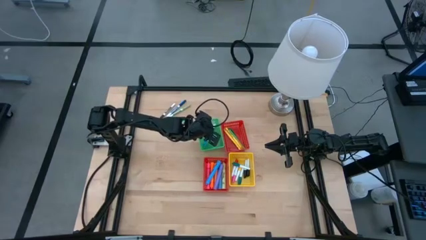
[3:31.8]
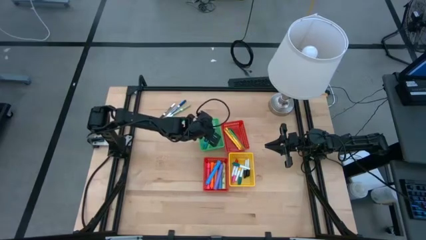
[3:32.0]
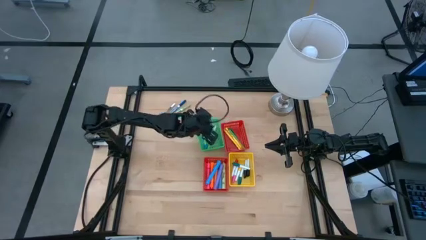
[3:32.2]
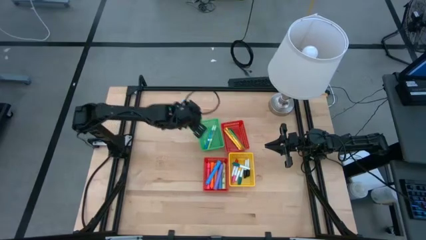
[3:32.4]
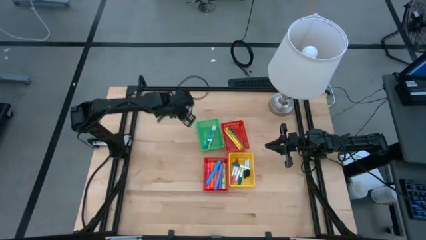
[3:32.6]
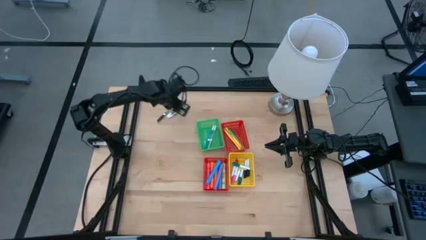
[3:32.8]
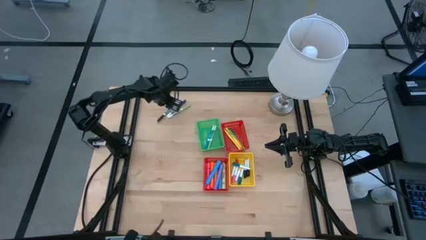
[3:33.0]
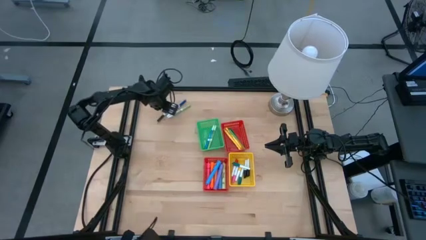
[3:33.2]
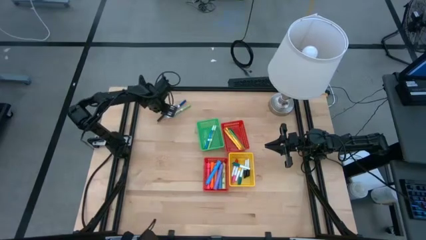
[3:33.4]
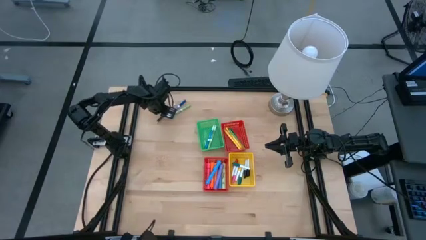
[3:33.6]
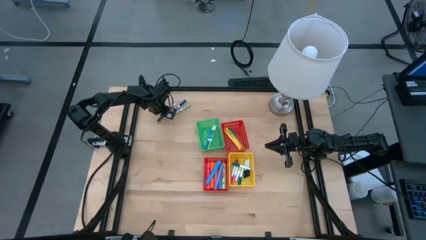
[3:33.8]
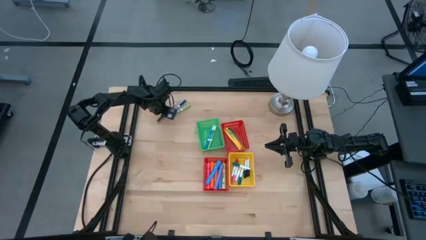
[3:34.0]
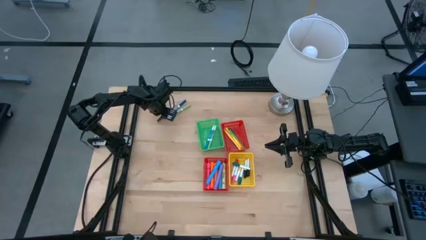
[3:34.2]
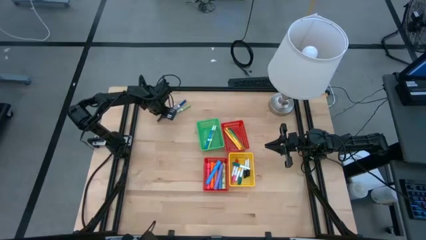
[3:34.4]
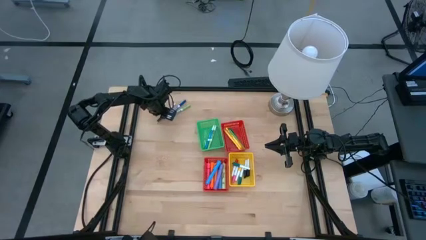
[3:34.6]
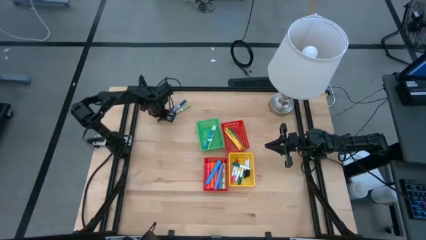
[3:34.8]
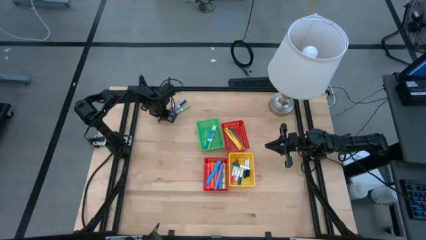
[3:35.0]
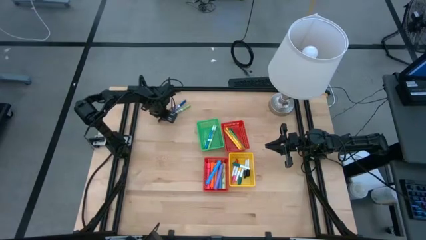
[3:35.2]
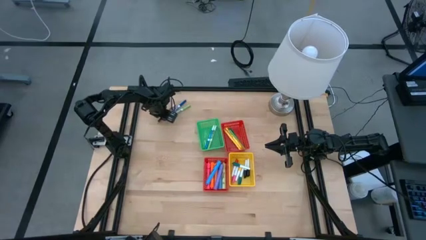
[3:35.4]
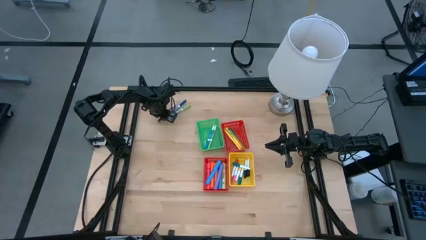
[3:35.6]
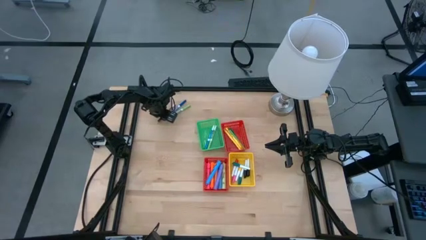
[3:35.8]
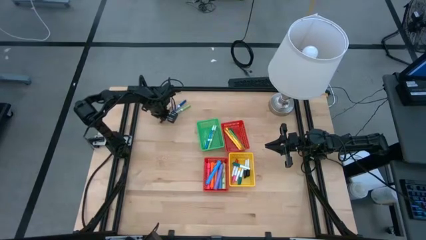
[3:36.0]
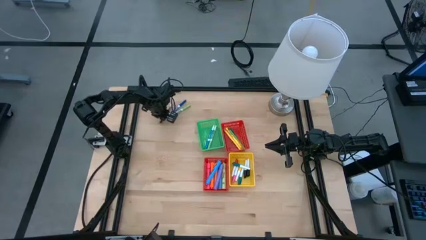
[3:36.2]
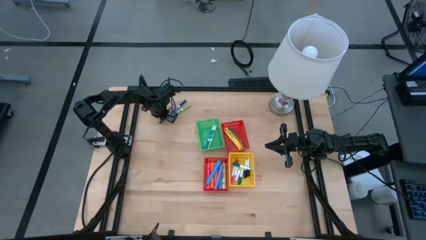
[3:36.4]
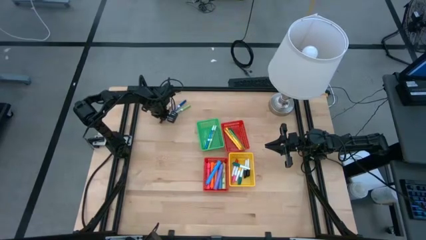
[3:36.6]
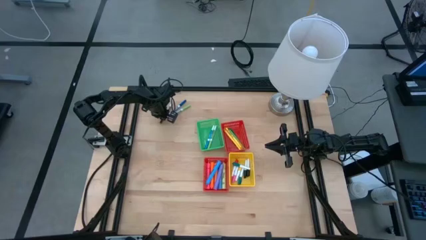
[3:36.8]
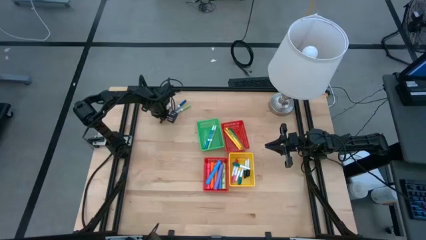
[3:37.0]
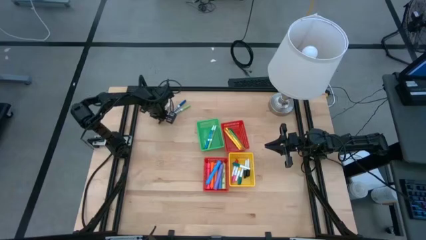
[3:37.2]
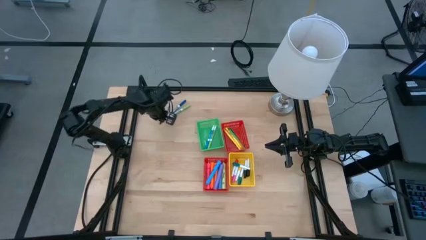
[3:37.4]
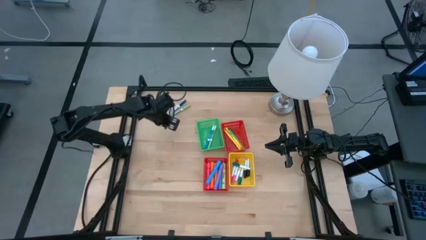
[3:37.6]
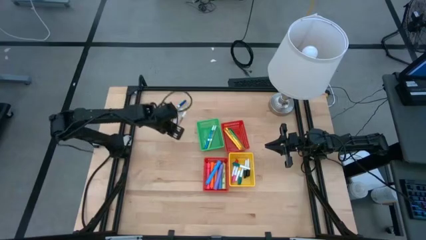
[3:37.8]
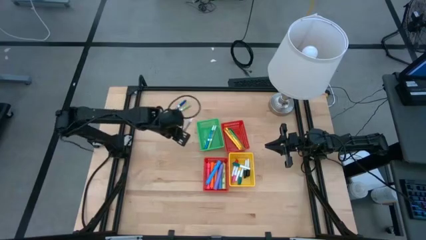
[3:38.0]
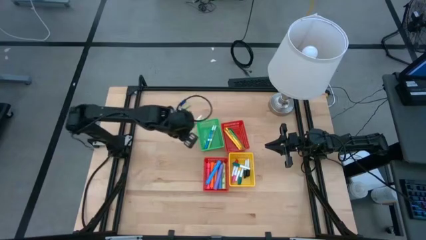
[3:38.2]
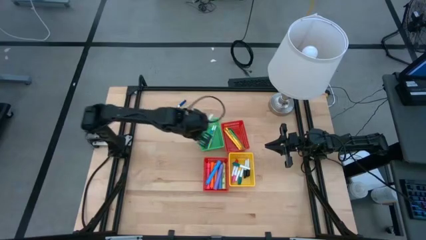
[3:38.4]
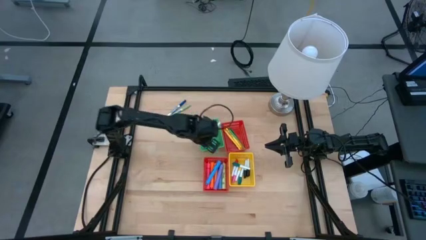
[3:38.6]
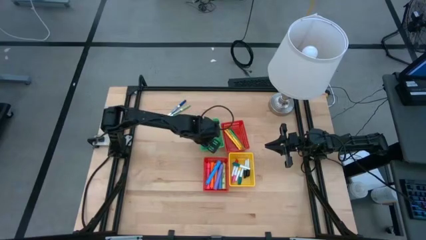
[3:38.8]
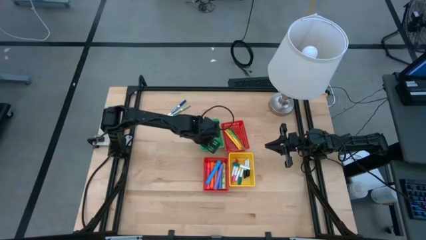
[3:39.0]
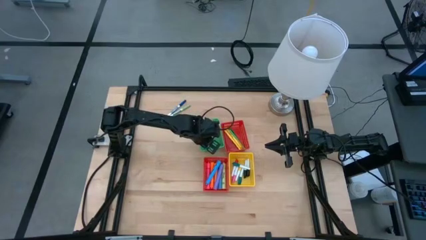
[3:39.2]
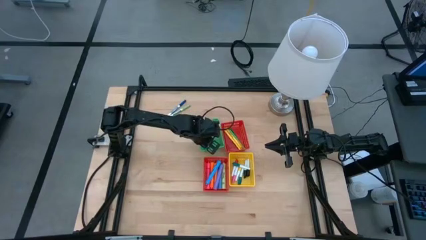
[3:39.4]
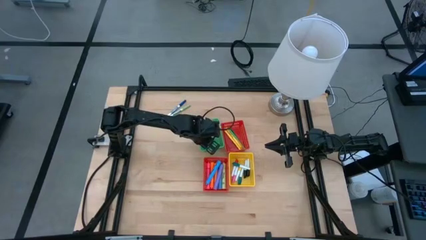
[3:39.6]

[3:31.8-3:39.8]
Task: Pick & Place Markers
Put the brown marker pen into the green bin

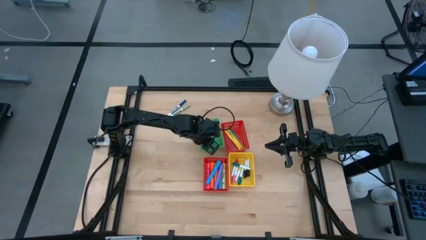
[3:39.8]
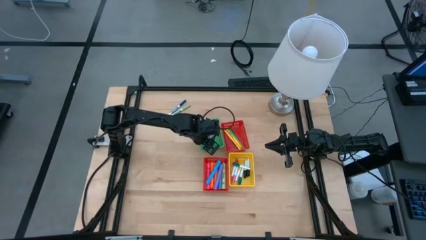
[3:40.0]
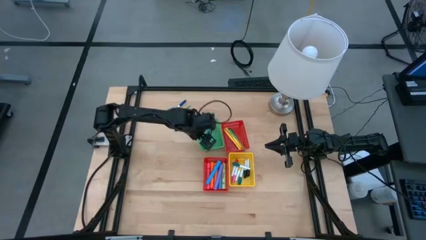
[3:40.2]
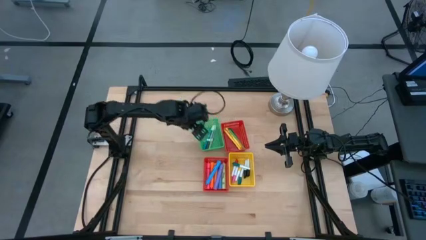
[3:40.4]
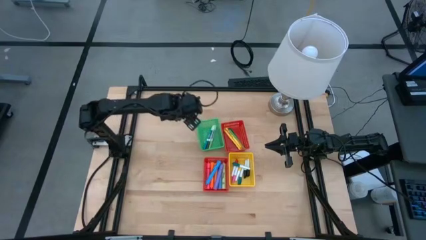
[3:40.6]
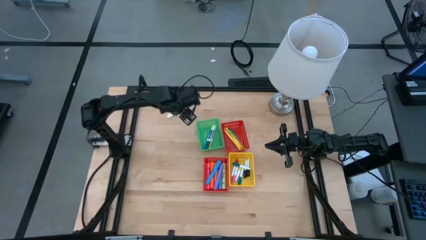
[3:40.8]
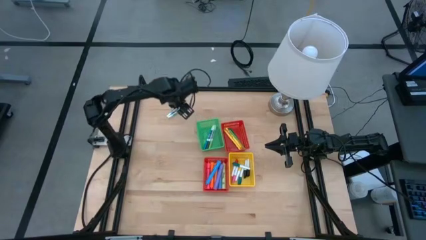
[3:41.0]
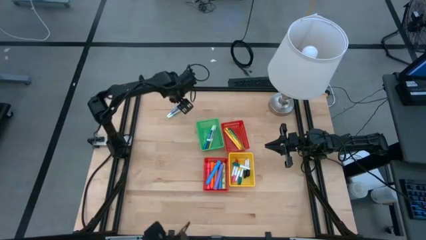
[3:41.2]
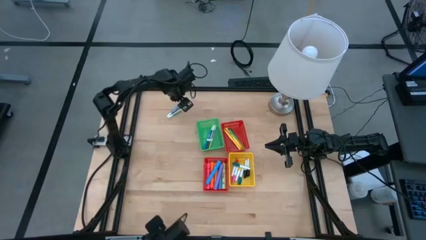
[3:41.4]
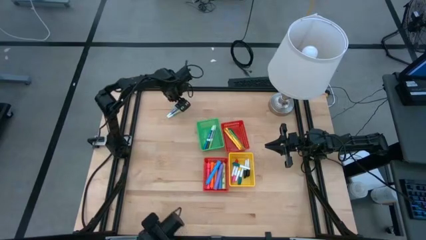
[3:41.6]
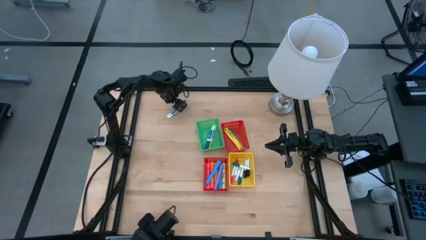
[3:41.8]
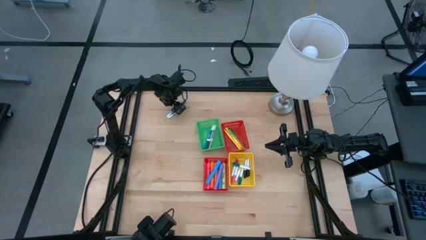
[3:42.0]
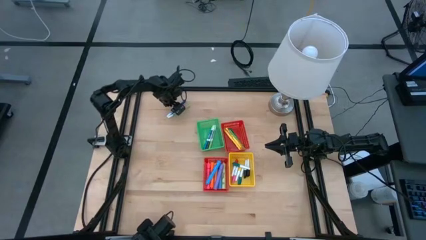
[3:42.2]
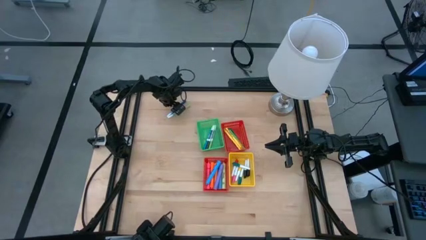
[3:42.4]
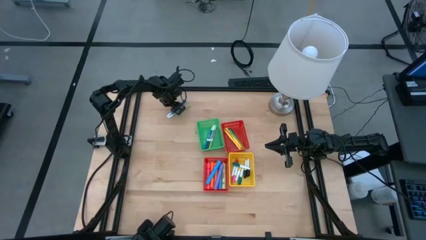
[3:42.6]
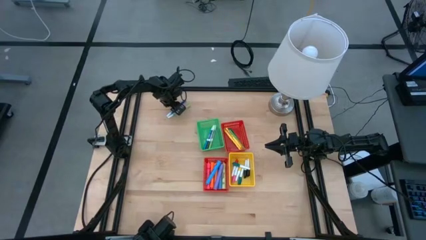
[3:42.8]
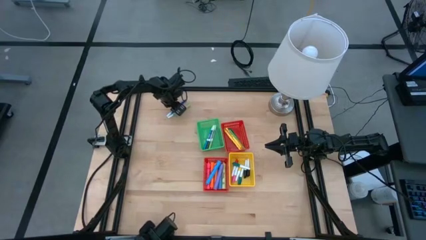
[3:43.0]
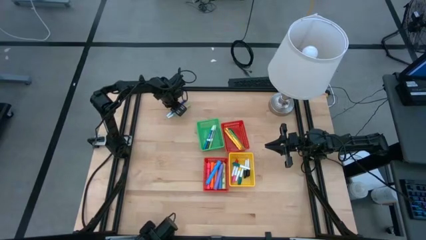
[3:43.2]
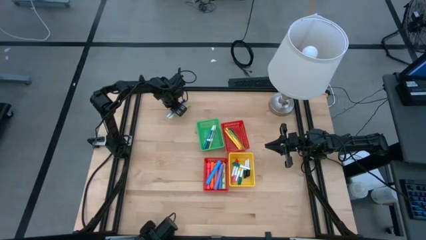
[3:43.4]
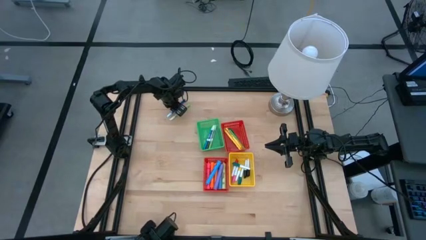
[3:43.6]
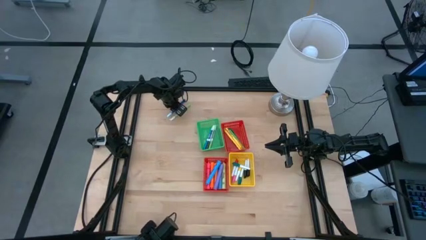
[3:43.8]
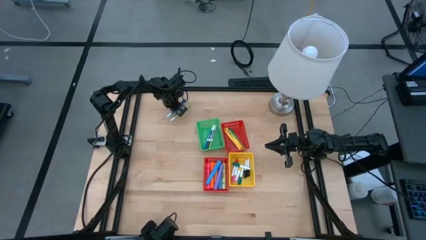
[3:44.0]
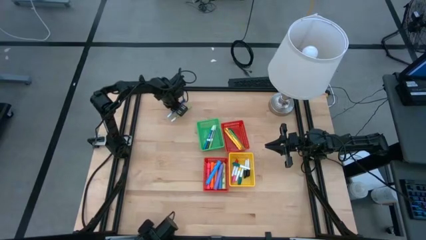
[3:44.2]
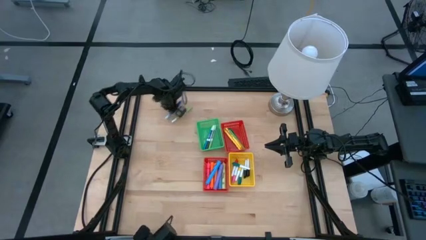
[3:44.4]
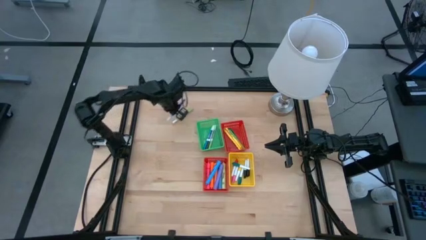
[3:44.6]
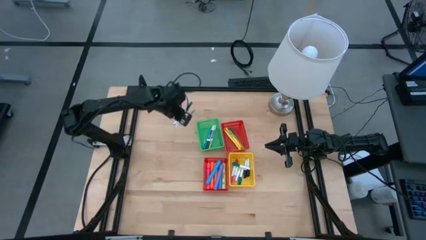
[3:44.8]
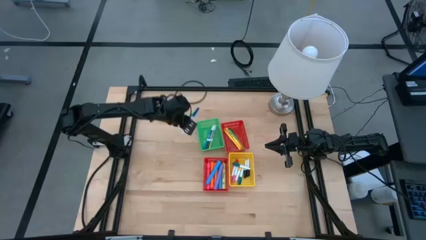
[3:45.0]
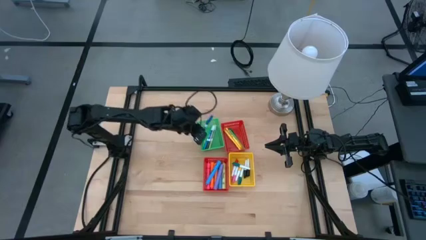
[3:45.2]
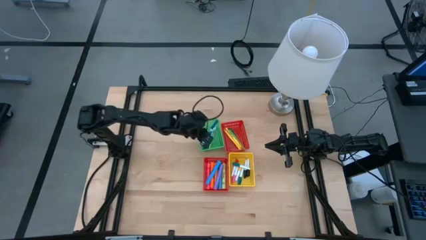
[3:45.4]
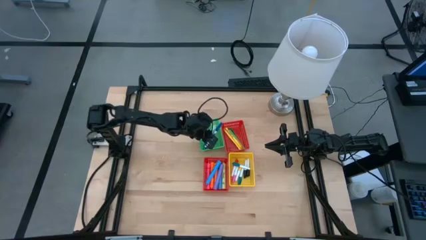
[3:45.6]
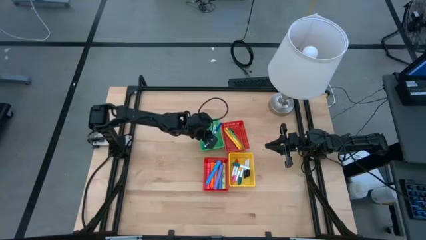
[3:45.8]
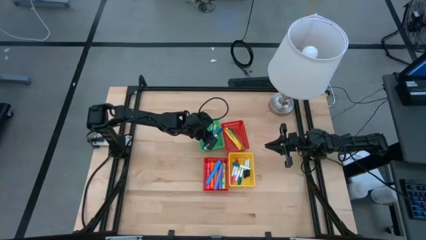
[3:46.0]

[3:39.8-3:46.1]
Put the blue marker pen into the green bin
